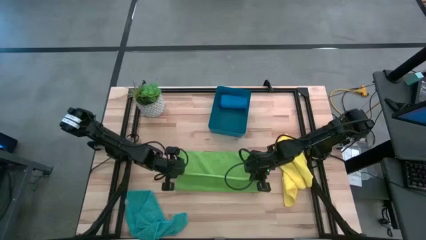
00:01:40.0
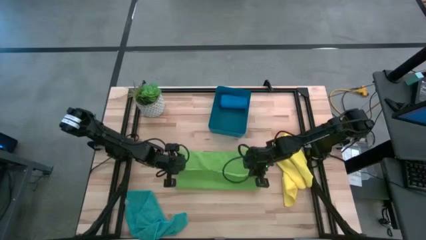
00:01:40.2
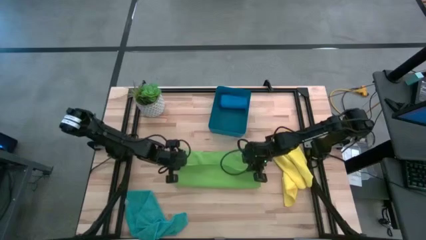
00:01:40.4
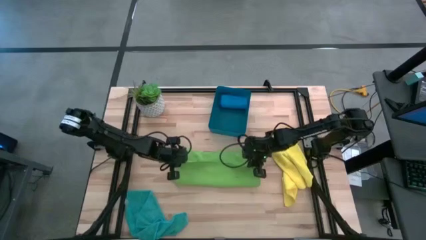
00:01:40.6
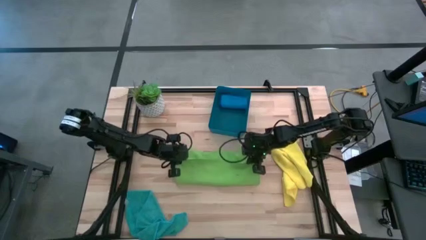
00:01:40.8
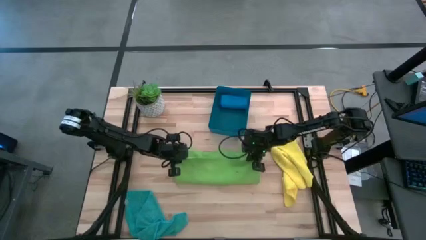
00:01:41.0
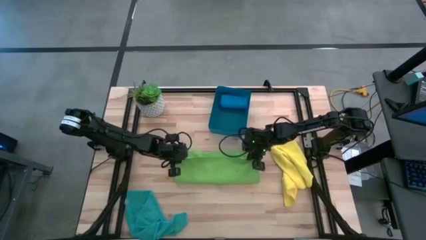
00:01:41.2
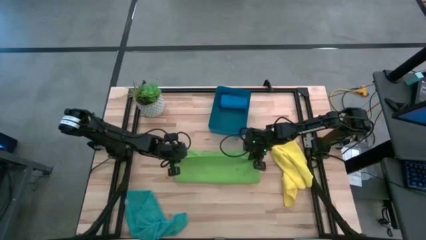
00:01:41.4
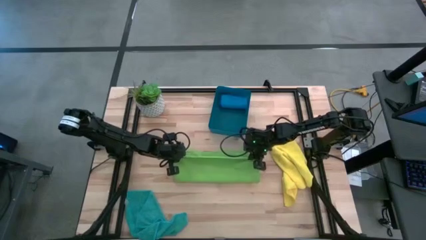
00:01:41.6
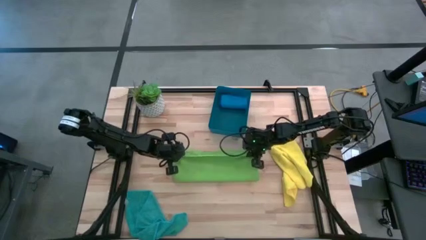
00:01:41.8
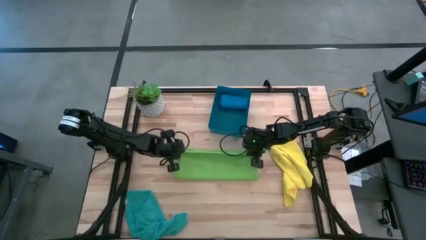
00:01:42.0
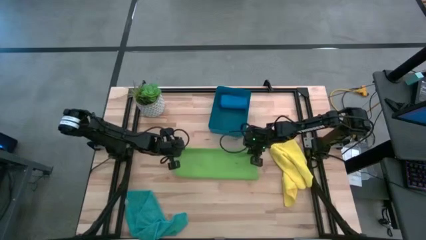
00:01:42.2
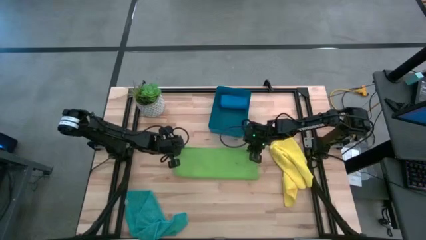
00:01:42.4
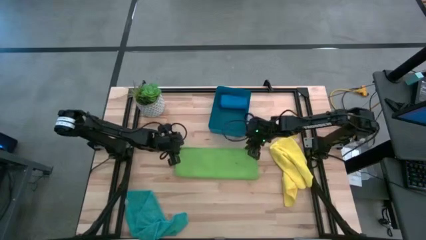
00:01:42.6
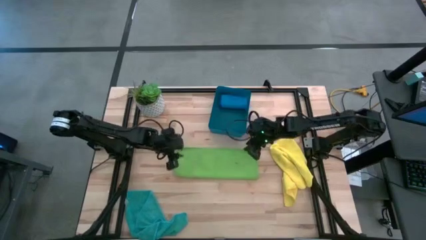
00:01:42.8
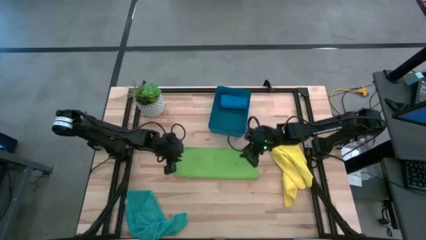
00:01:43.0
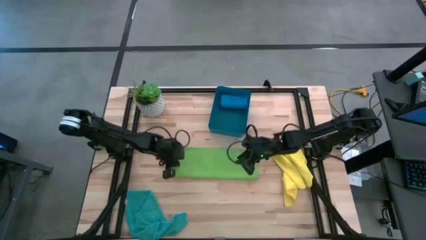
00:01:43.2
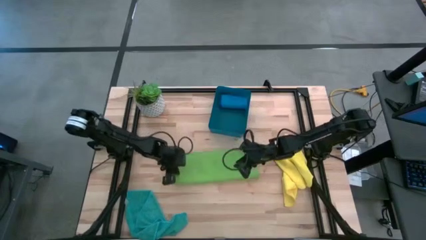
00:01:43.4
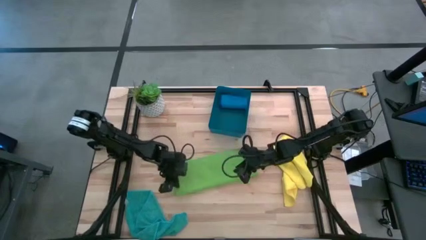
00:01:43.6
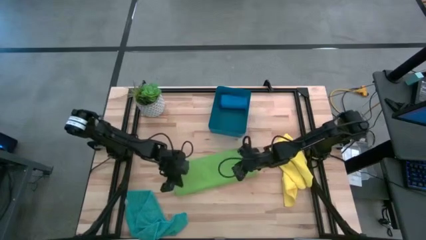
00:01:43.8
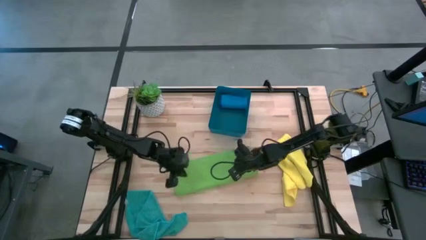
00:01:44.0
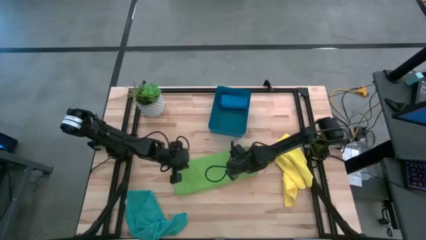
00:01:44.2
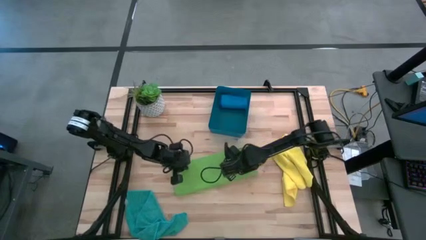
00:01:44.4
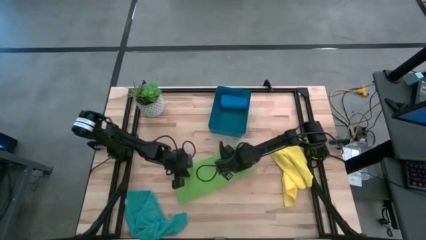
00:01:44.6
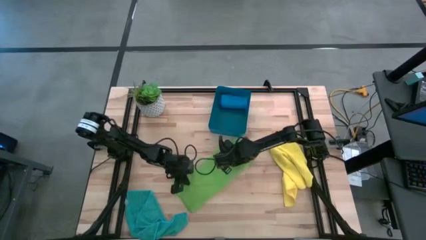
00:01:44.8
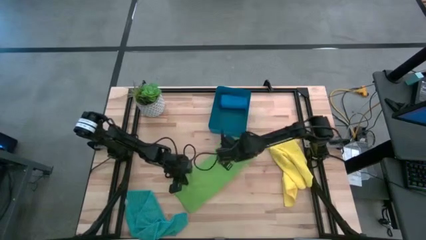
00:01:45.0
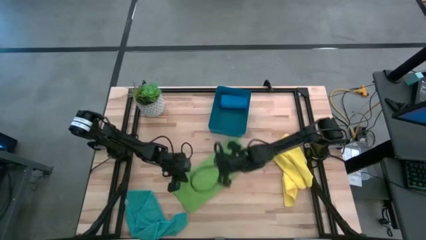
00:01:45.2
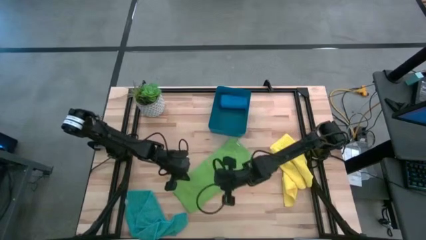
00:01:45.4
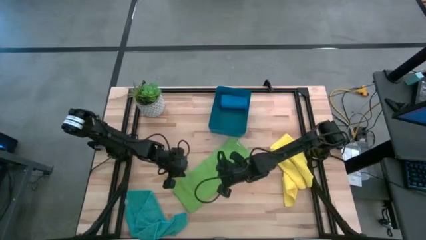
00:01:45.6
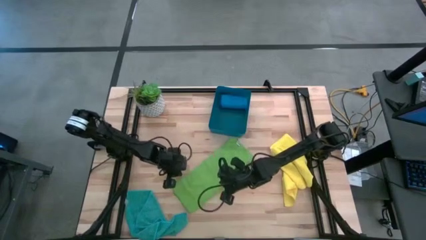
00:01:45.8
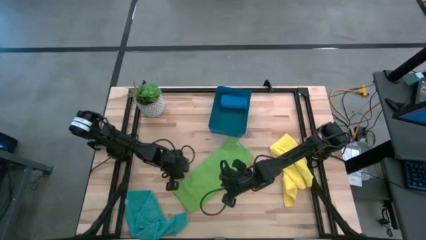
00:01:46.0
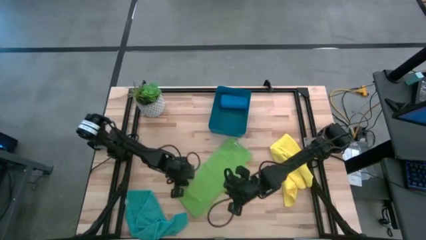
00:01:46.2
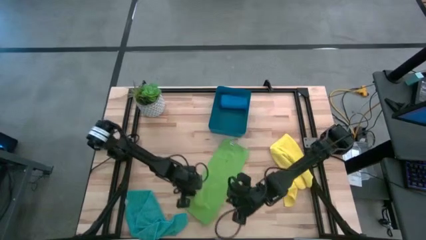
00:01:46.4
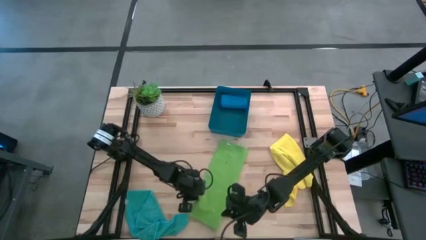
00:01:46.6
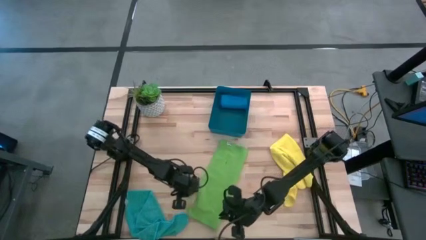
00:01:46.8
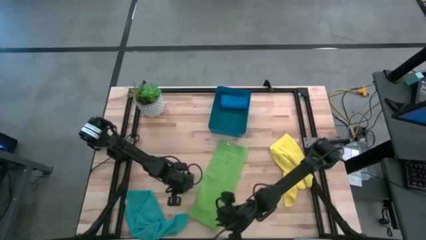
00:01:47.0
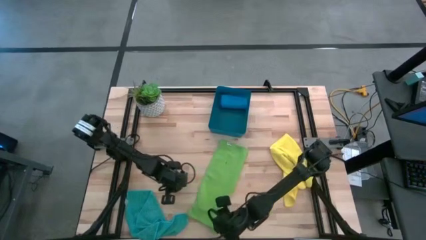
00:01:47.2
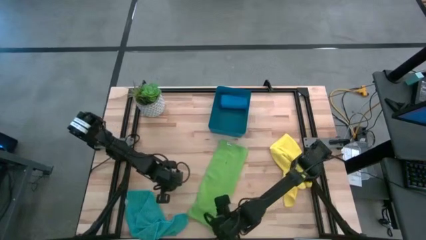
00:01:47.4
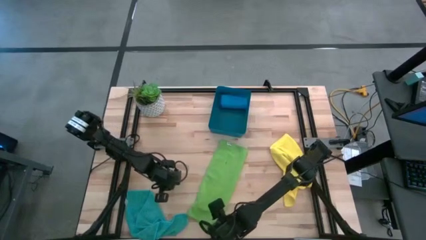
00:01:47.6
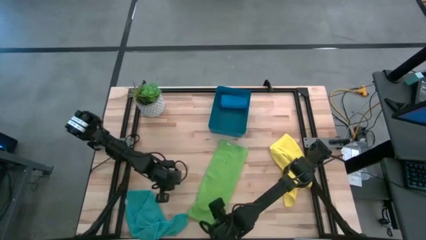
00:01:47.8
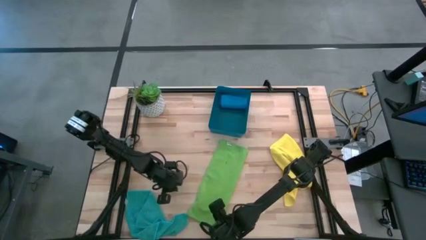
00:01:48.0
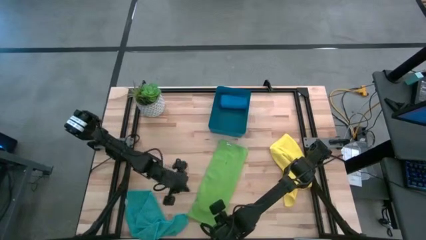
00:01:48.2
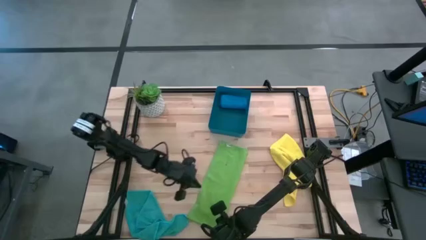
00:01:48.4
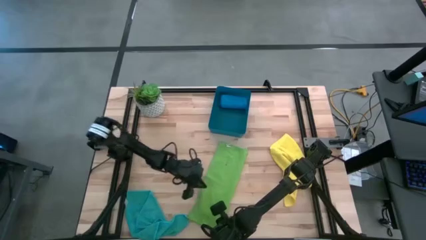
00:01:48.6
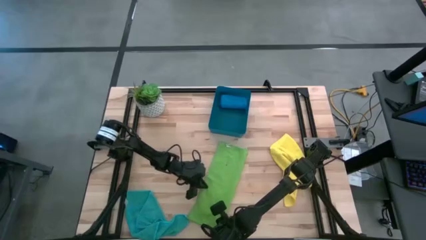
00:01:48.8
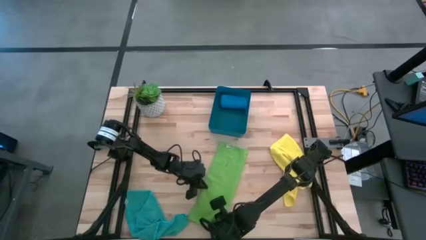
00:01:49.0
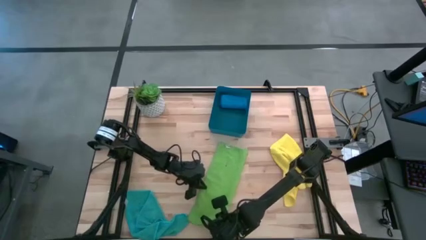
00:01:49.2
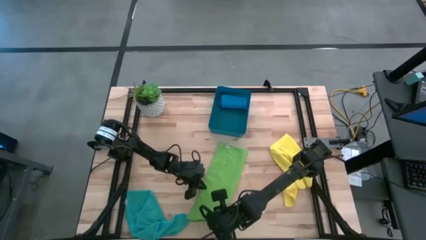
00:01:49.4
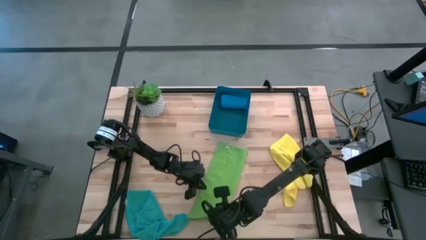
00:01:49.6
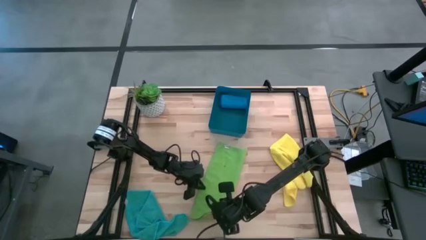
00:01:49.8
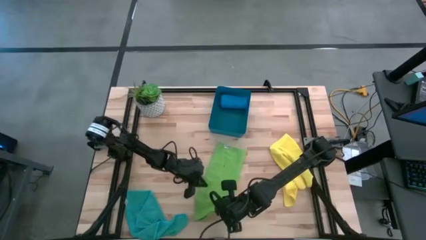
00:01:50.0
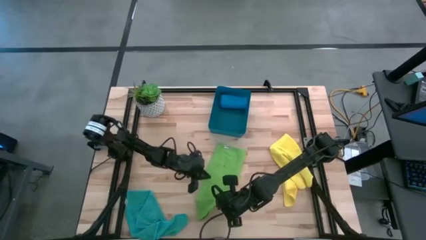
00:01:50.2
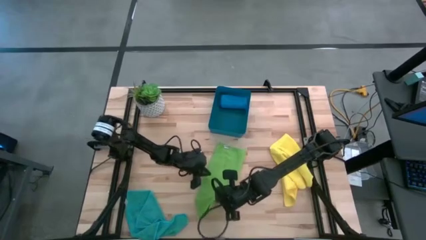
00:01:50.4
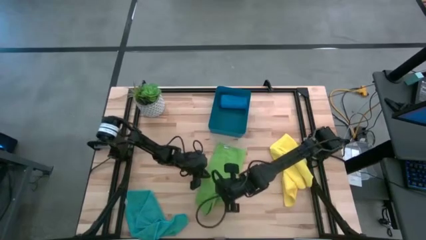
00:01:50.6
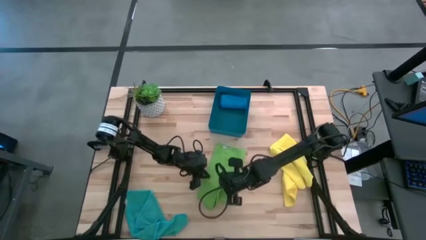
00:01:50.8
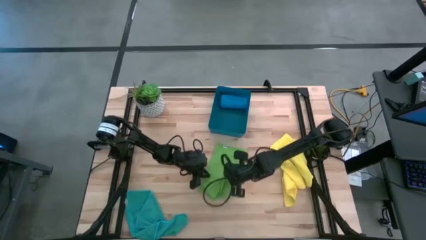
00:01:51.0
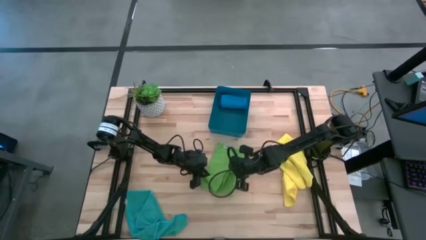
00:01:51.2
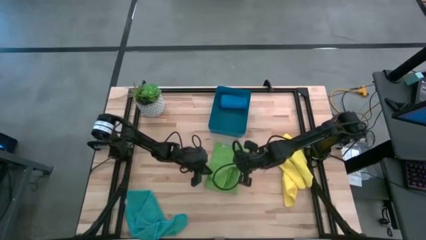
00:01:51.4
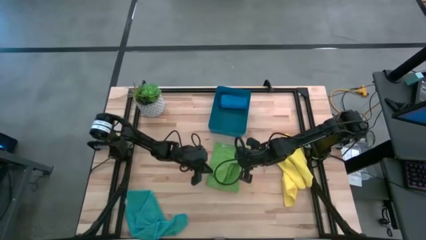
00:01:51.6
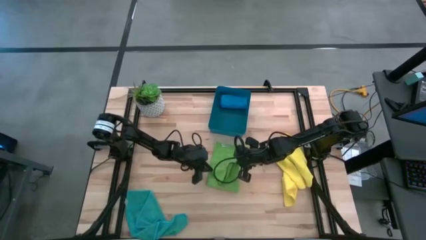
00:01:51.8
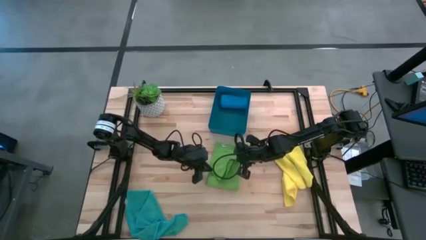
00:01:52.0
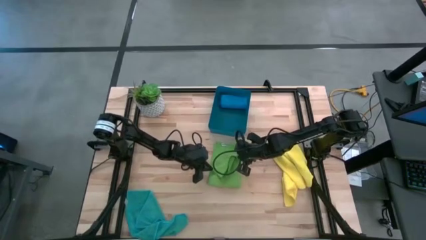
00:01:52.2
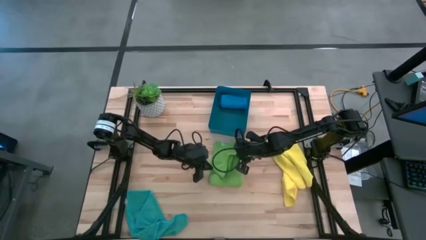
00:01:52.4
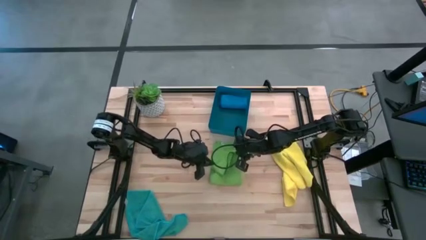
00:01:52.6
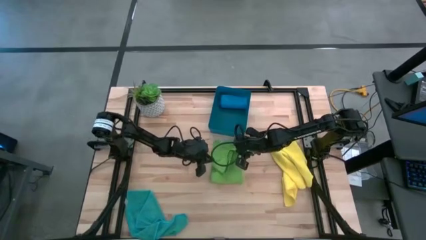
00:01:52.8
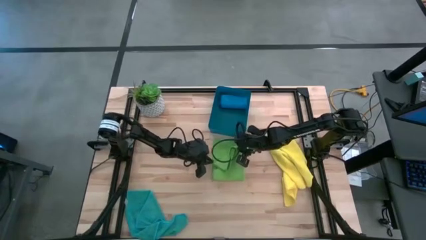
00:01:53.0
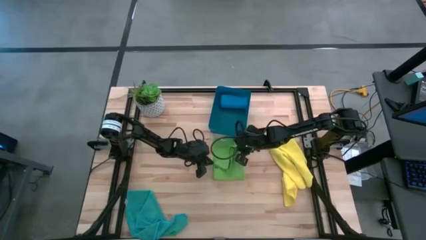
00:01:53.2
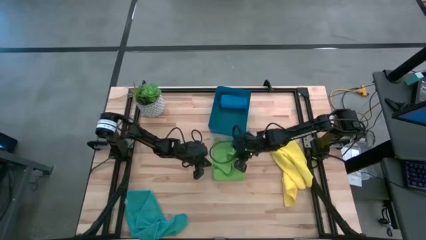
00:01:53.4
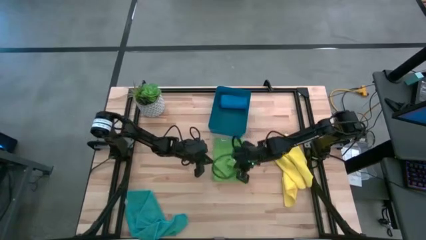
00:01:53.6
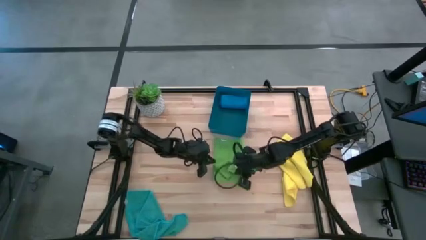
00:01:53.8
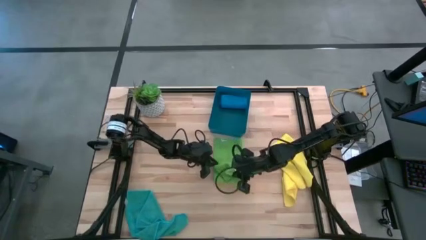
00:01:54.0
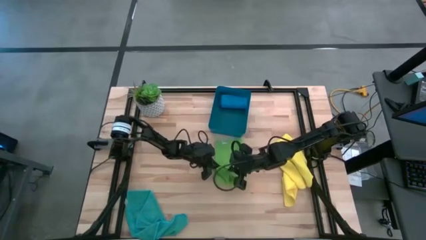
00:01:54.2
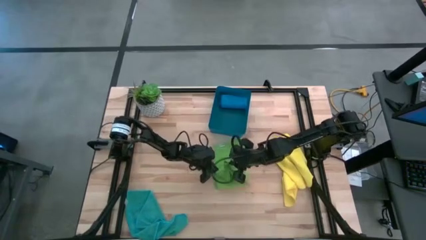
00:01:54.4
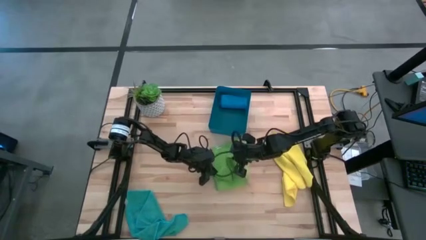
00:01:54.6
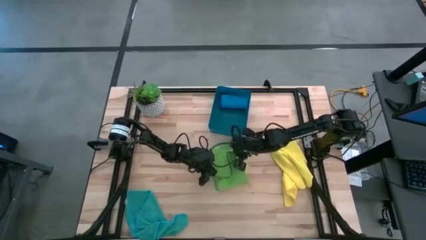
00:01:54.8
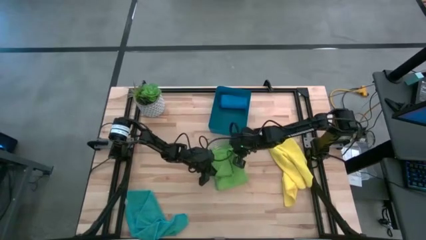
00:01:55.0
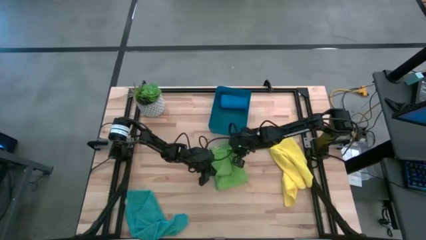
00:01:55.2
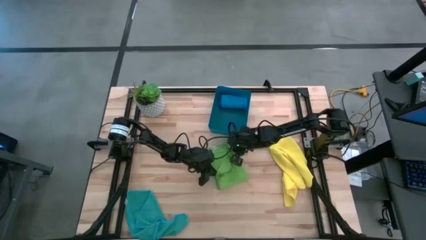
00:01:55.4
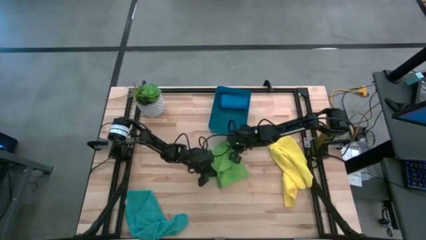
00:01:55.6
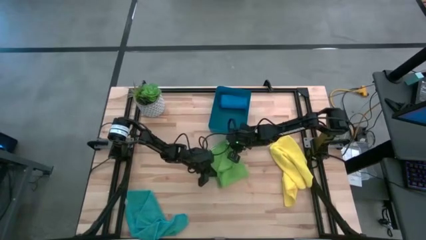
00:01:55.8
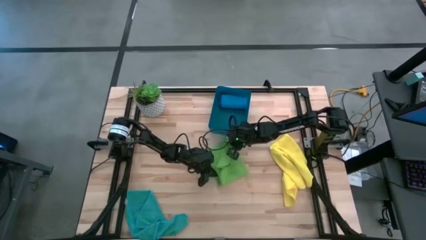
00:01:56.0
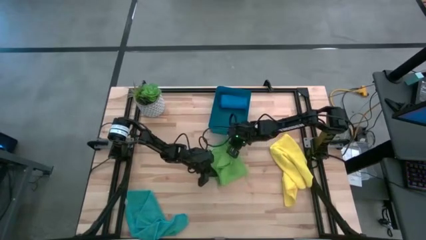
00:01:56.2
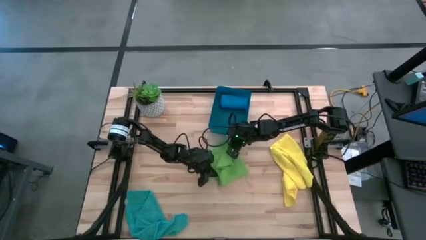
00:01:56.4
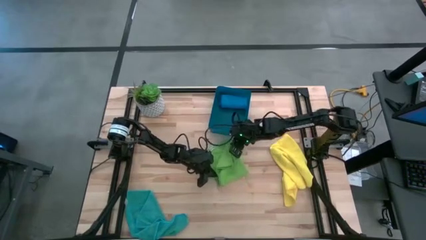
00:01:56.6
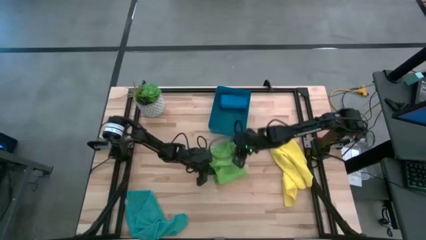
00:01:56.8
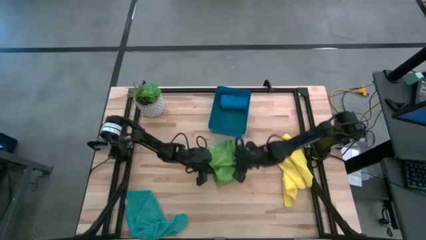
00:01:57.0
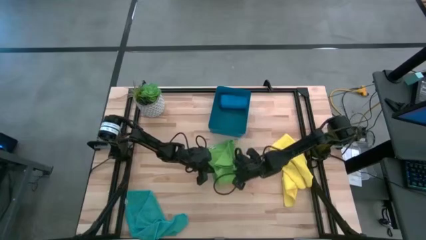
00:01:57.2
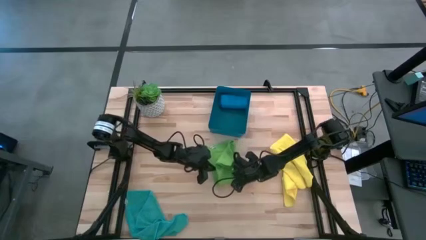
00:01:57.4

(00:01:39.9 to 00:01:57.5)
Task: Fold microfiber towels
Fold the green microfiber cloth
